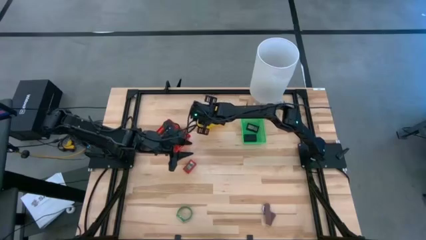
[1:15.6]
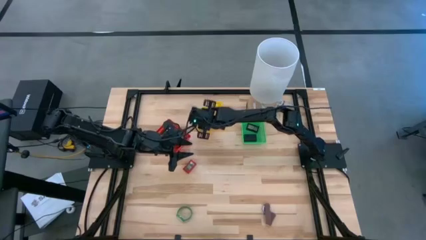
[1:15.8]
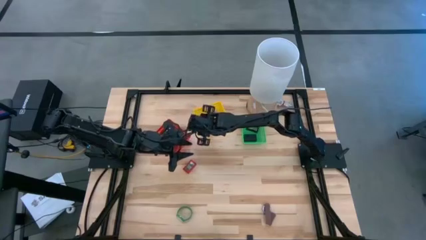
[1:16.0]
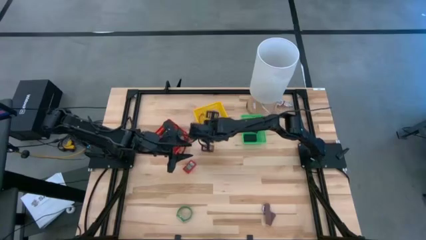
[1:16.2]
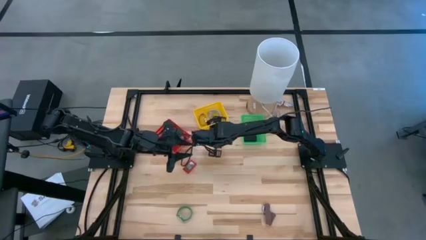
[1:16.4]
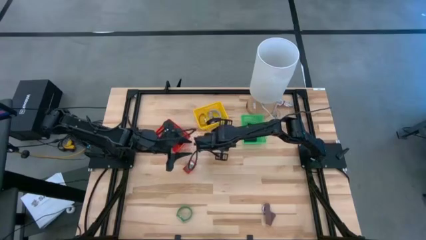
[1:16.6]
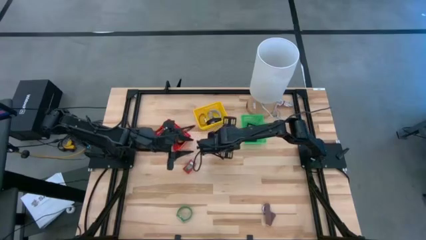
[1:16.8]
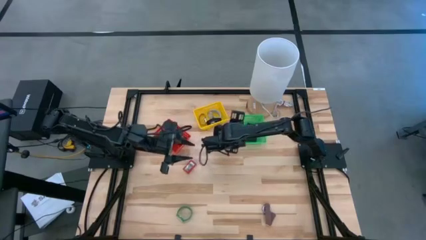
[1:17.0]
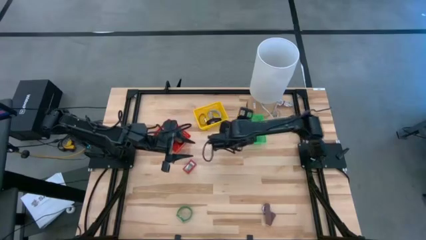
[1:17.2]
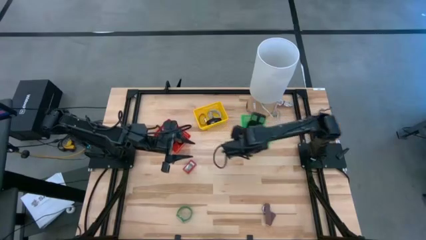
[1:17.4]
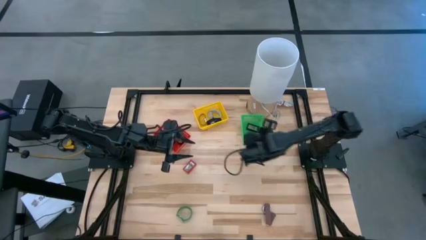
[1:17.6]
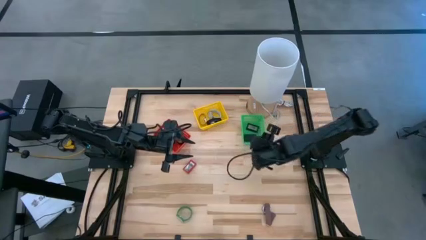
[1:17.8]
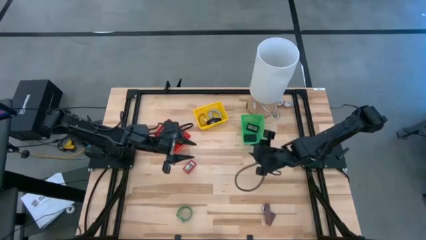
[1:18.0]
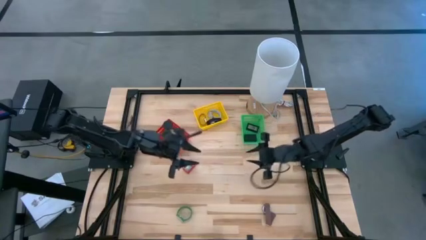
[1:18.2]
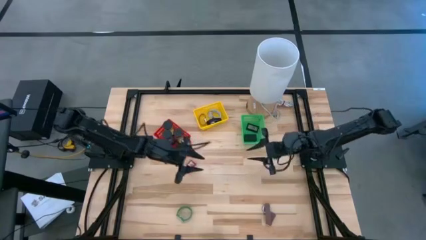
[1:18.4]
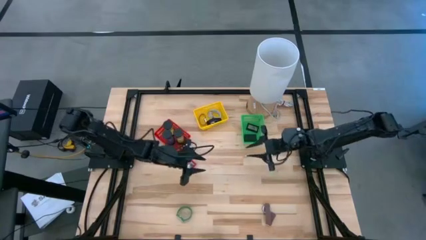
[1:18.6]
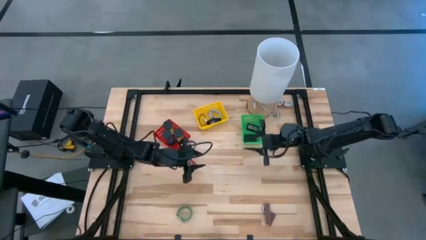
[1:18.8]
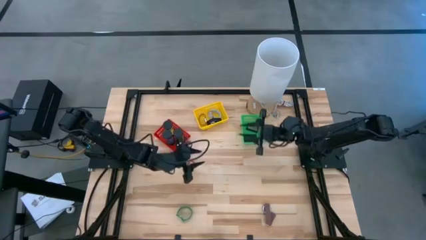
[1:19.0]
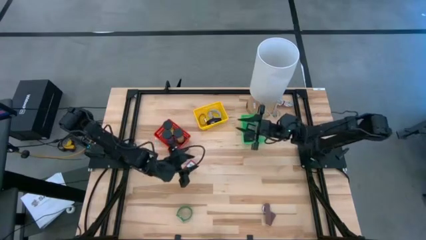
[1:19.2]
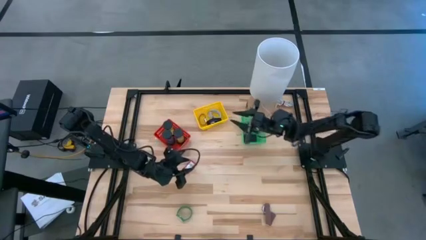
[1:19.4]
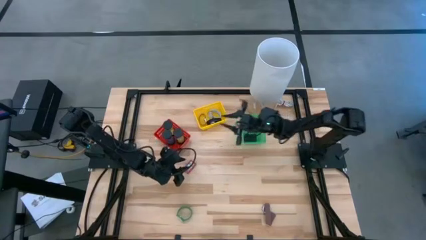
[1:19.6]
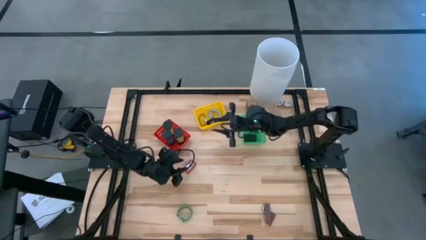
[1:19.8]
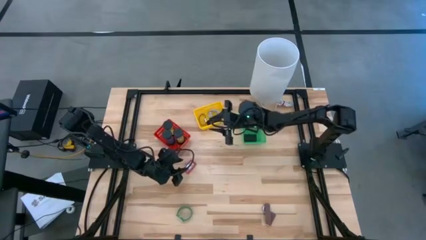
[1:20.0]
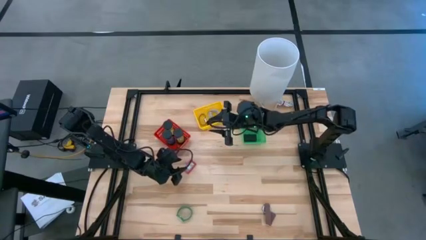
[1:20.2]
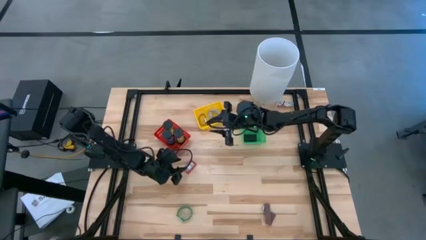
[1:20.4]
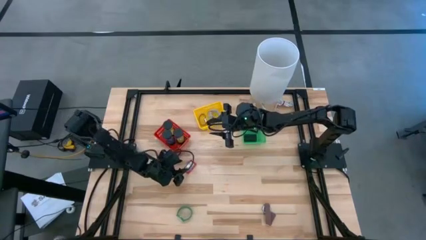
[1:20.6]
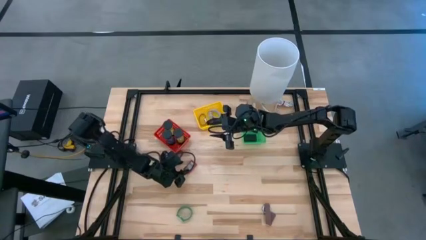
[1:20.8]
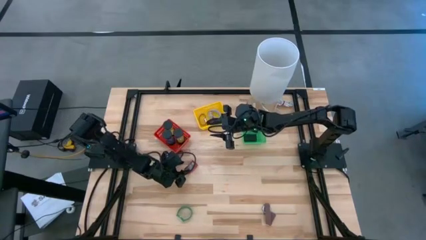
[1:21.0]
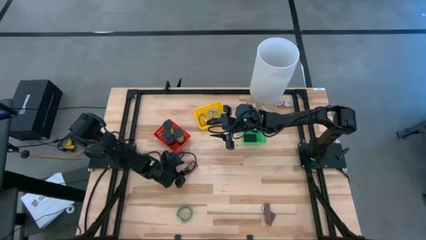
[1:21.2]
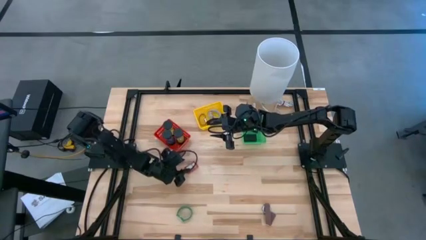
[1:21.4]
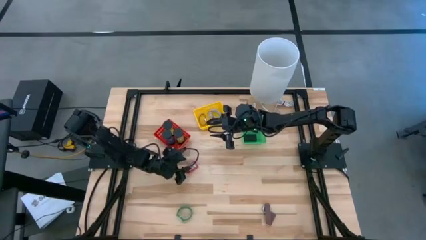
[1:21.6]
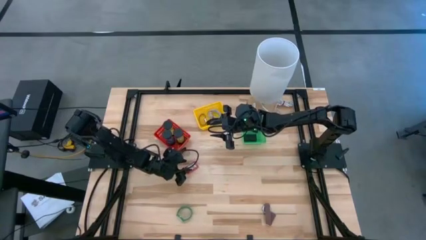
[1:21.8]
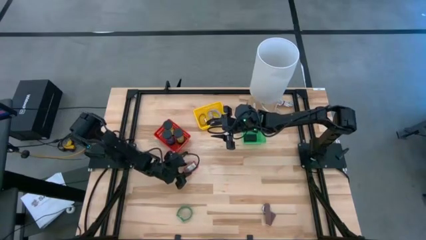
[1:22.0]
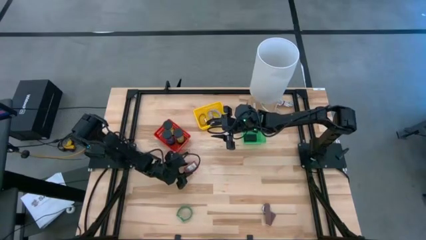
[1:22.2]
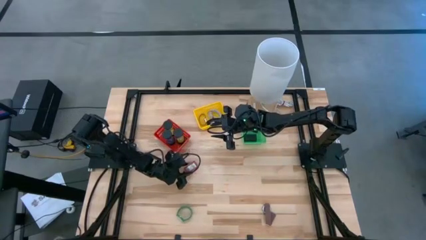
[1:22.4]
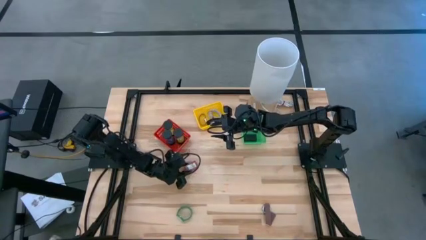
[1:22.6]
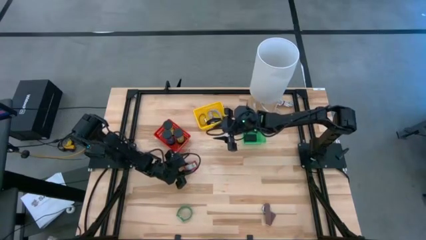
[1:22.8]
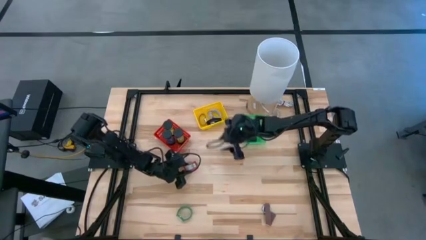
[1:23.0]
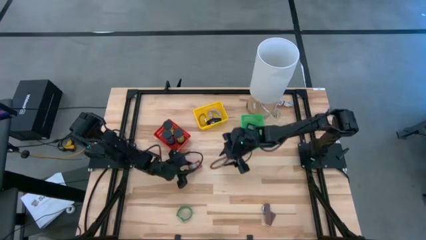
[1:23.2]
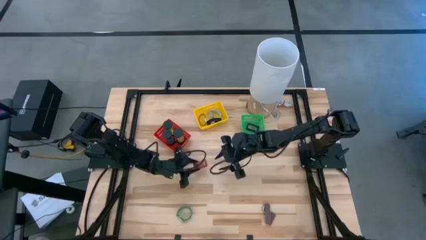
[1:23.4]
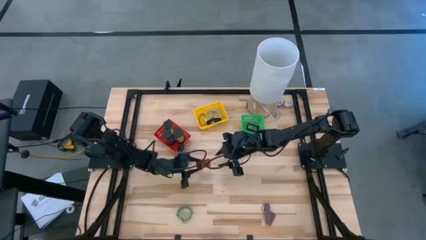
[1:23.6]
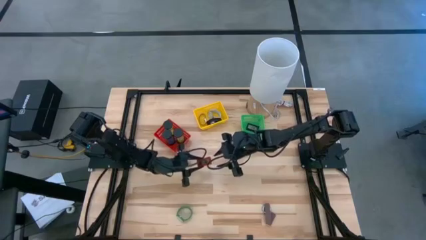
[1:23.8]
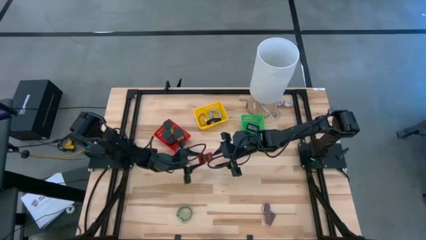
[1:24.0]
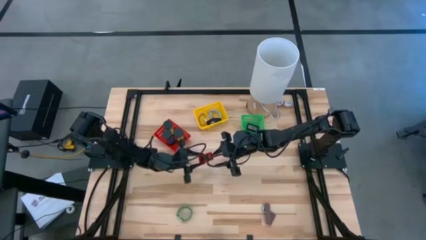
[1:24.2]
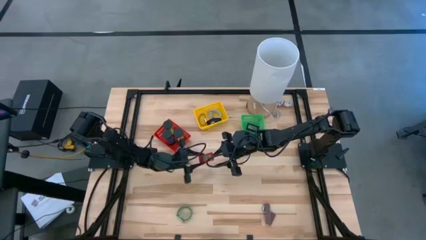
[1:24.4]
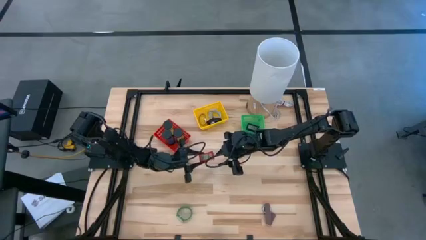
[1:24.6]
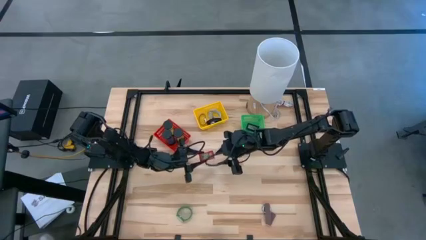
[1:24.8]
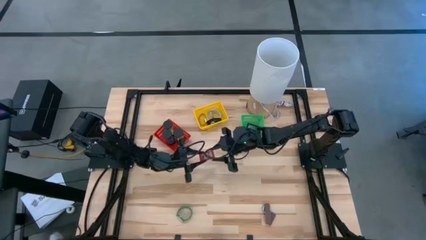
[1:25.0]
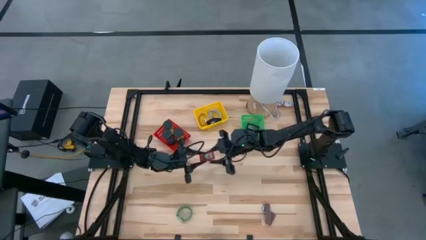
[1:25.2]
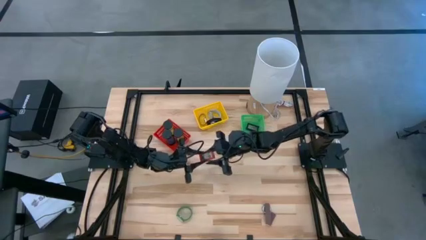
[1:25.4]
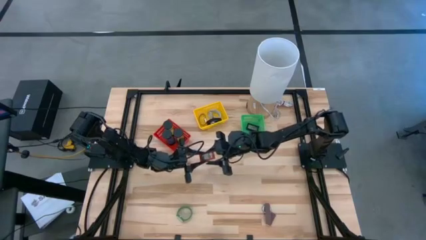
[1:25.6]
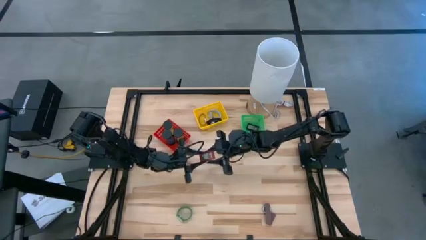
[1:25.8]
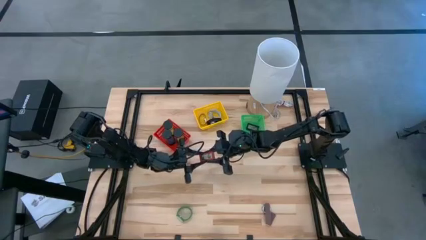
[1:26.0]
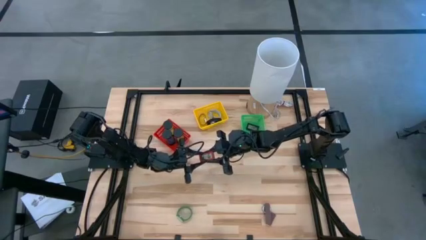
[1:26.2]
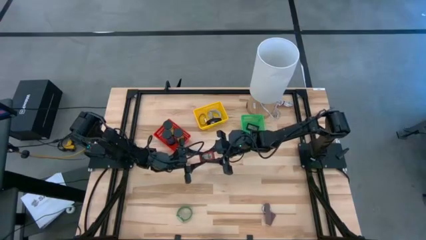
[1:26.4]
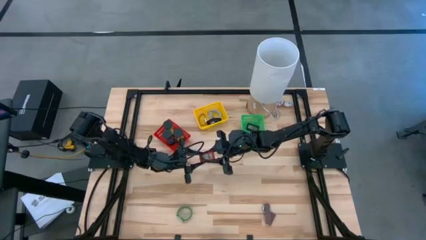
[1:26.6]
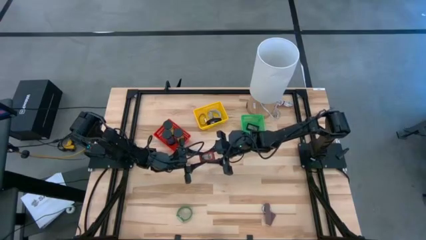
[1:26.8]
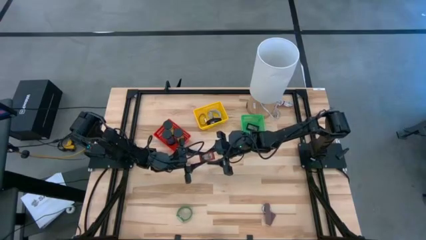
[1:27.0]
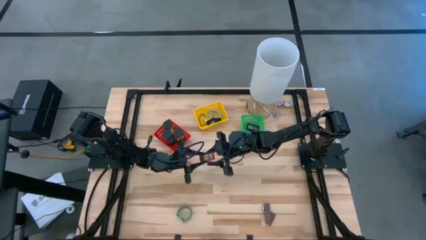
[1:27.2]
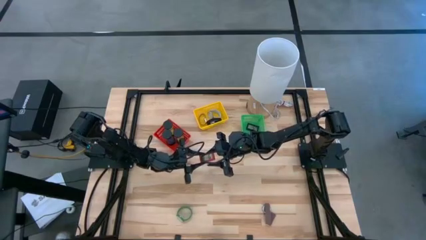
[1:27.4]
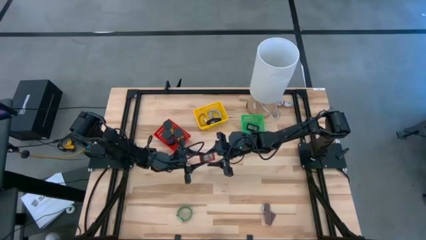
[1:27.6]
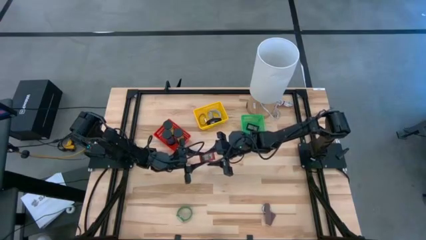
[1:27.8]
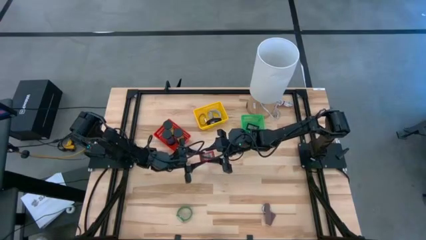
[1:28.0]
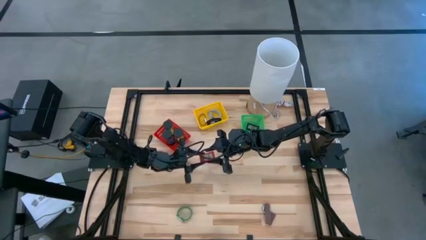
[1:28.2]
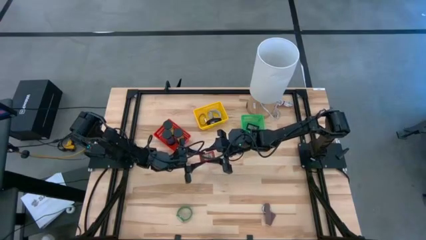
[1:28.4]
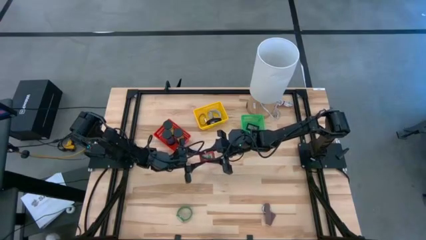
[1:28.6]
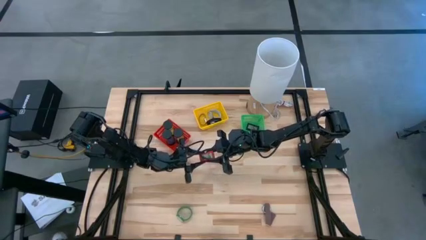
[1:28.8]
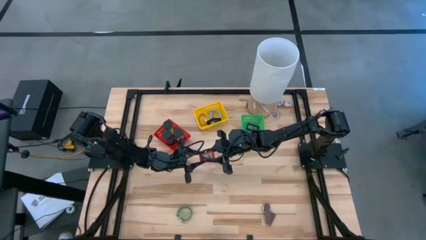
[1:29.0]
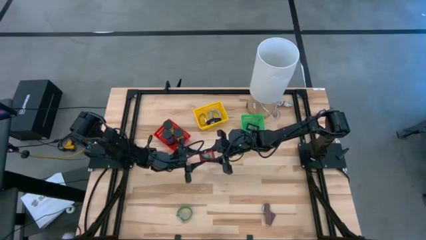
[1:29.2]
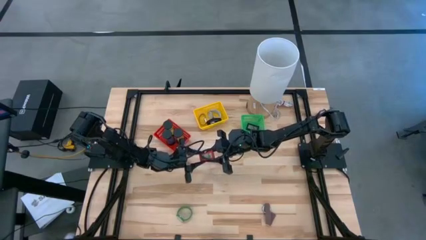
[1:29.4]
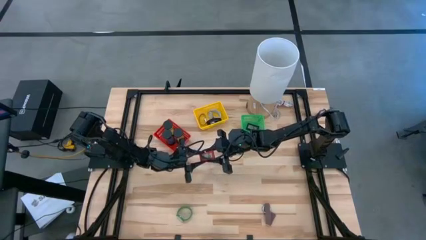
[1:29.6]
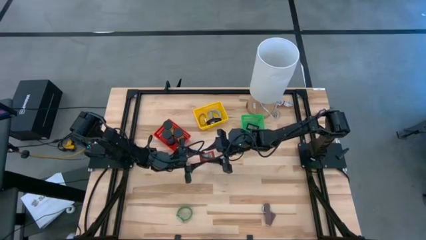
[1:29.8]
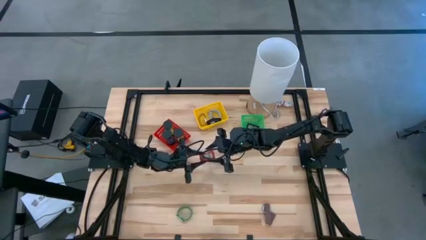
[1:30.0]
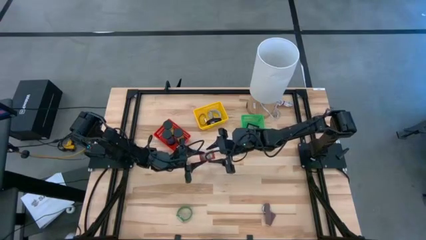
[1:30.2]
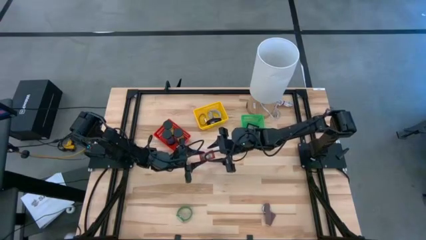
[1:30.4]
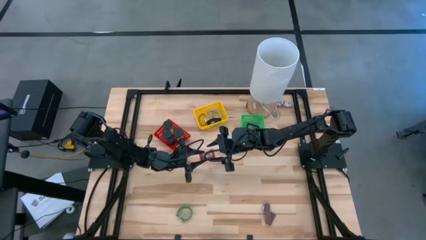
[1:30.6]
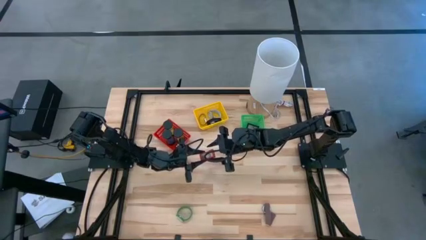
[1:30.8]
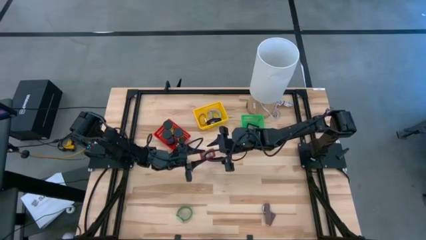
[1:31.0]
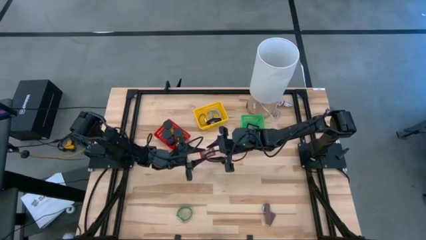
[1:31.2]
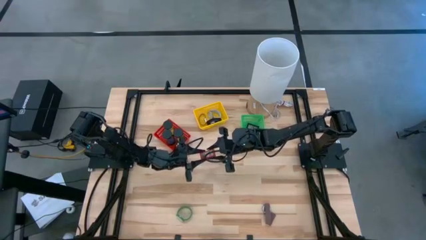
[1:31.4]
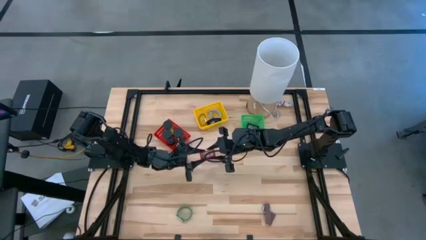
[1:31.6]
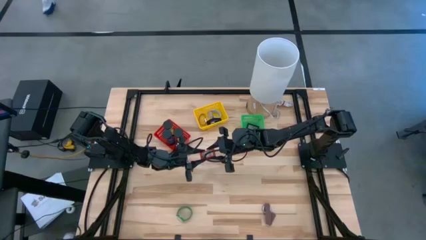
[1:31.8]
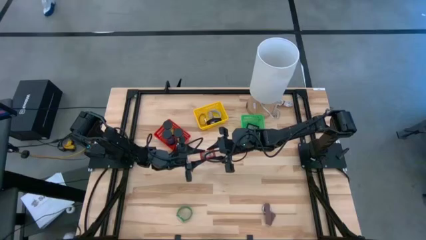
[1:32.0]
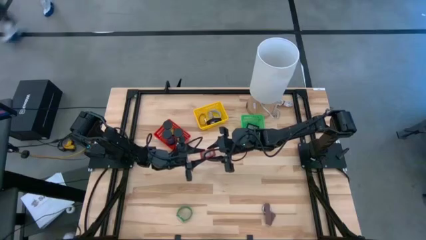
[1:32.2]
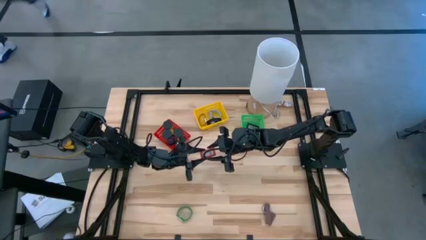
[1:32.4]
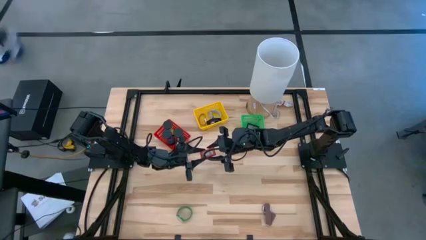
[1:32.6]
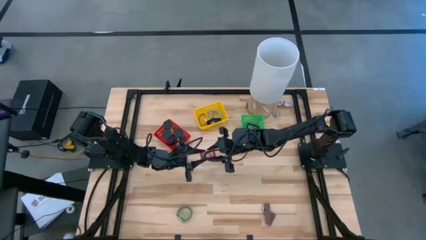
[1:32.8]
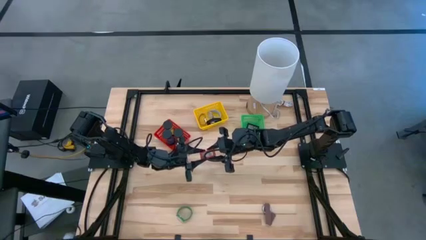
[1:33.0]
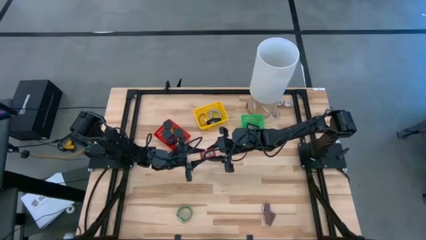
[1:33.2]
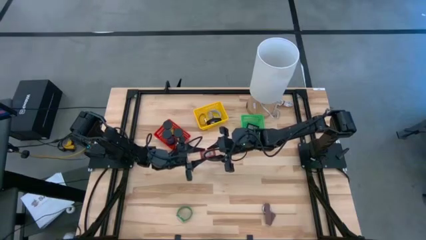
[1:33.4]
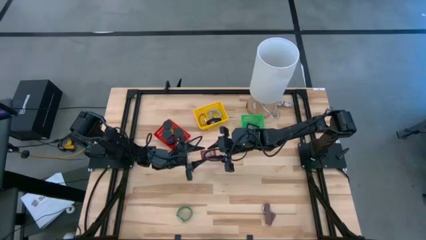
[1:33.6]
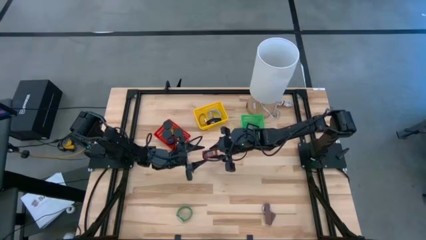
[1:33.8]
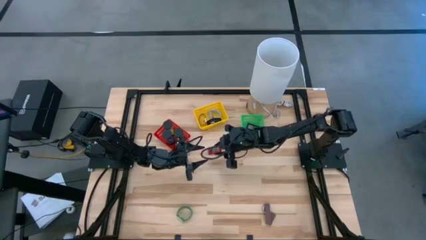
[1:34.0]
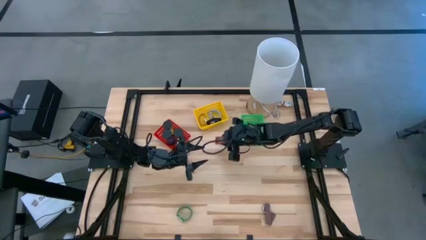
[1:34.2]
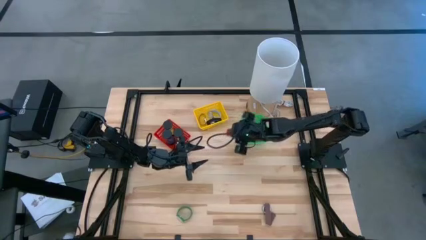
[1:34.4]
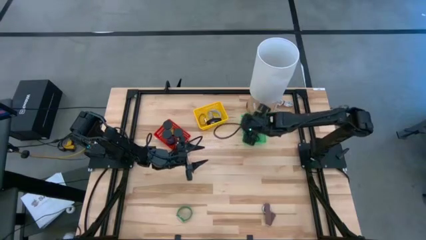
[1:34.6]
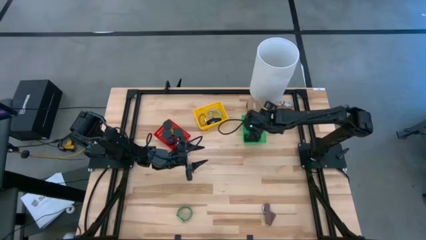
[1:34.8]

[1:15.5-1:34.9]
Task: Pick & Place Office items
Put the red digital clock into the green basket
